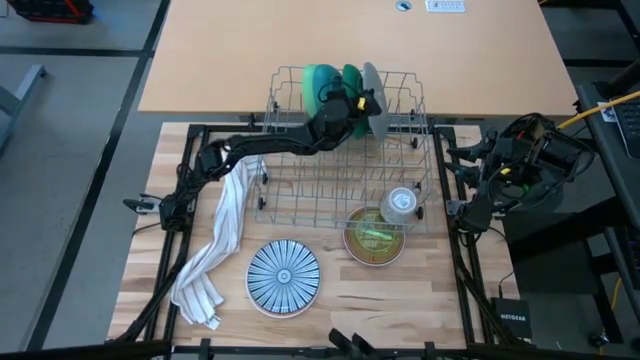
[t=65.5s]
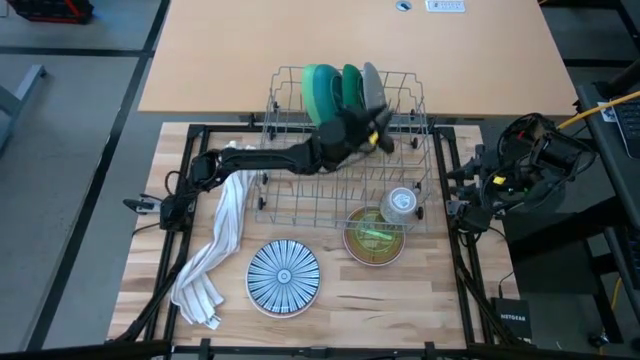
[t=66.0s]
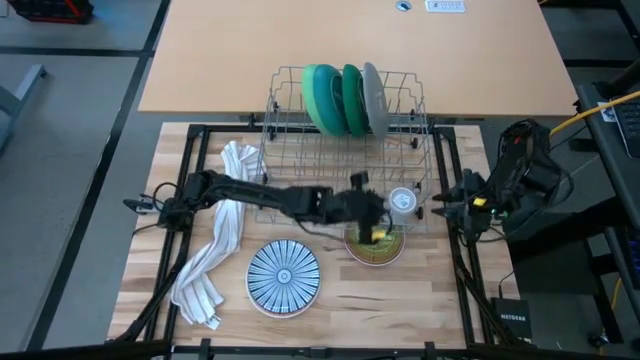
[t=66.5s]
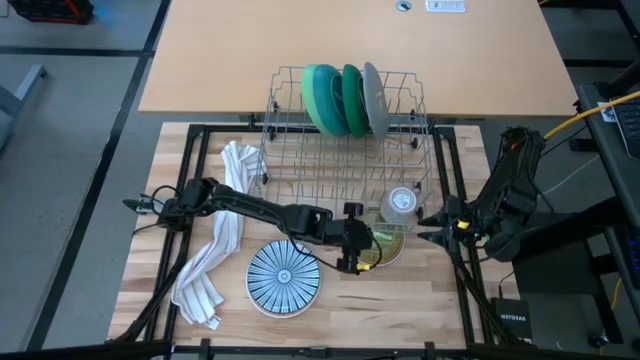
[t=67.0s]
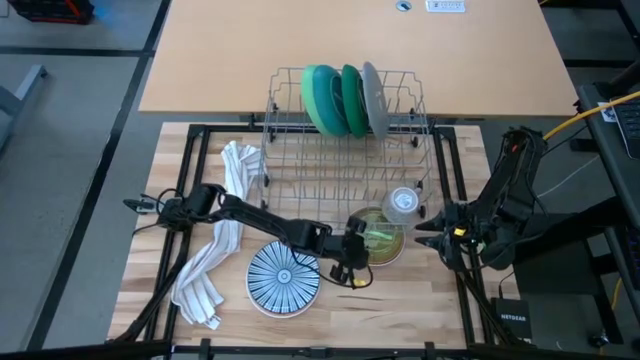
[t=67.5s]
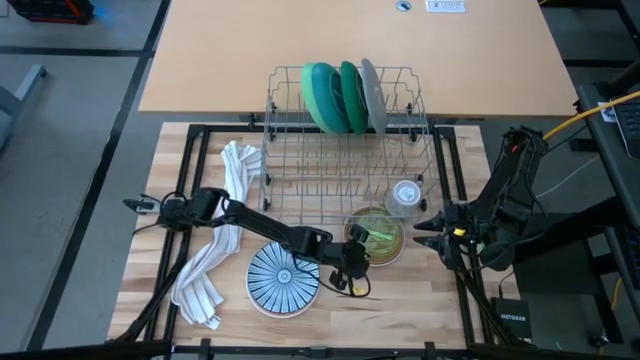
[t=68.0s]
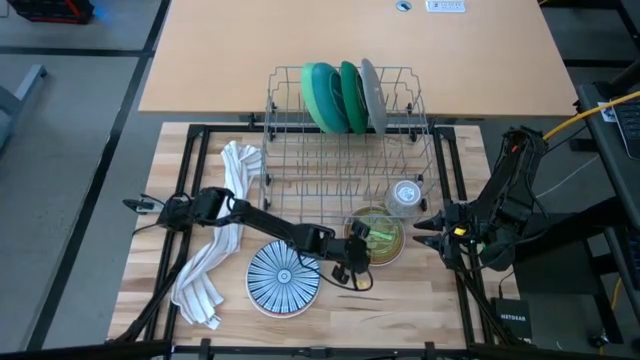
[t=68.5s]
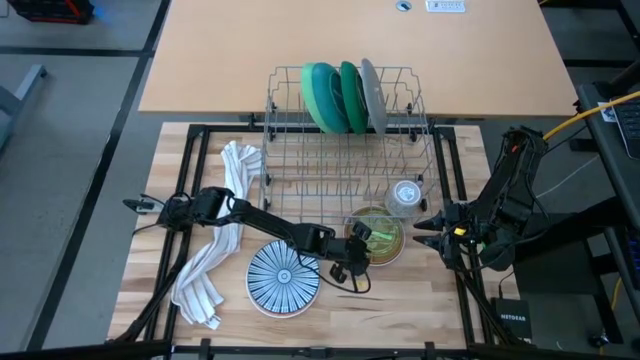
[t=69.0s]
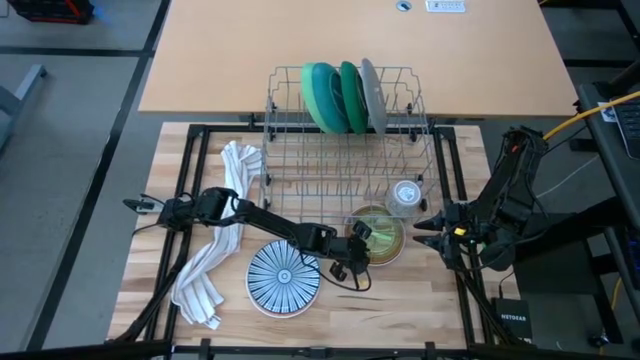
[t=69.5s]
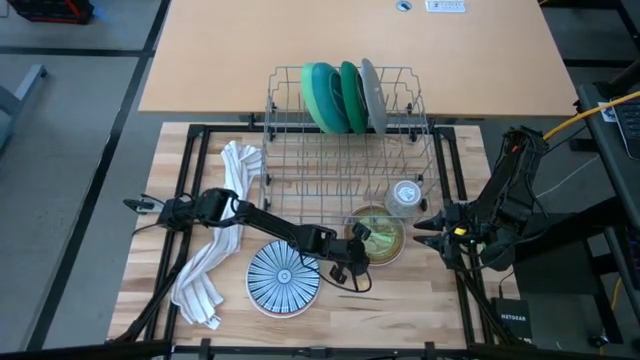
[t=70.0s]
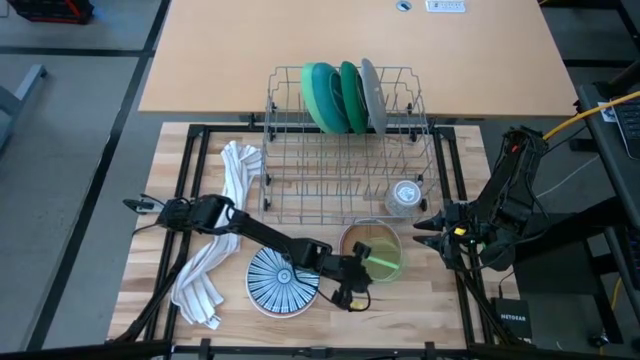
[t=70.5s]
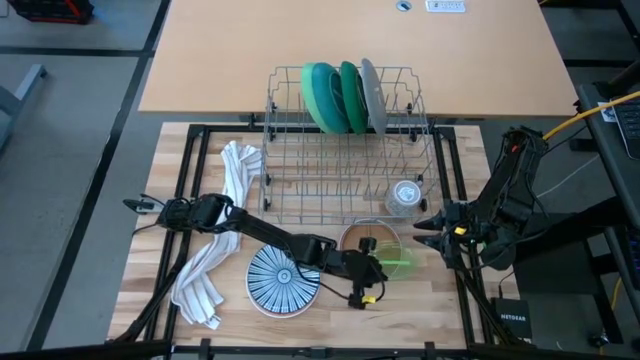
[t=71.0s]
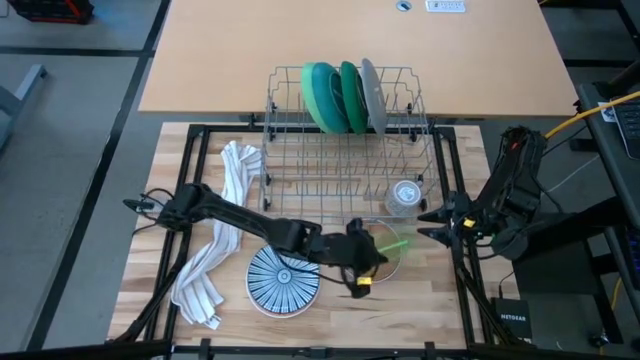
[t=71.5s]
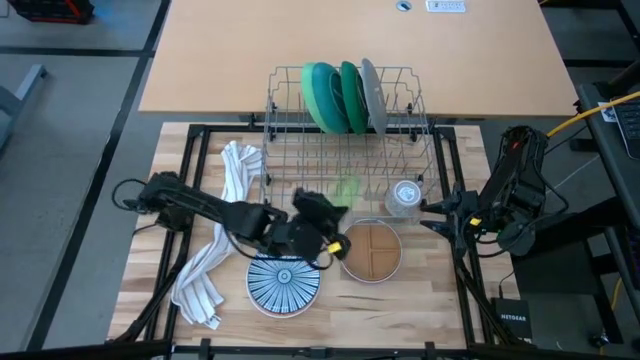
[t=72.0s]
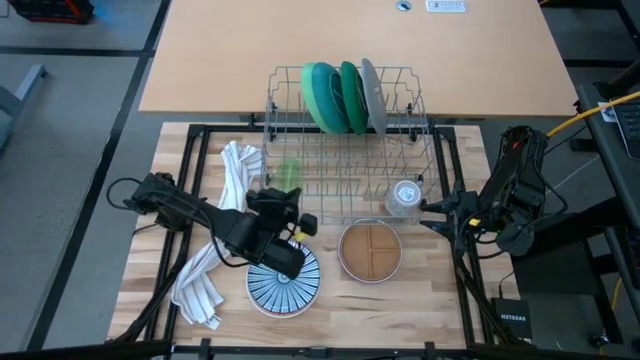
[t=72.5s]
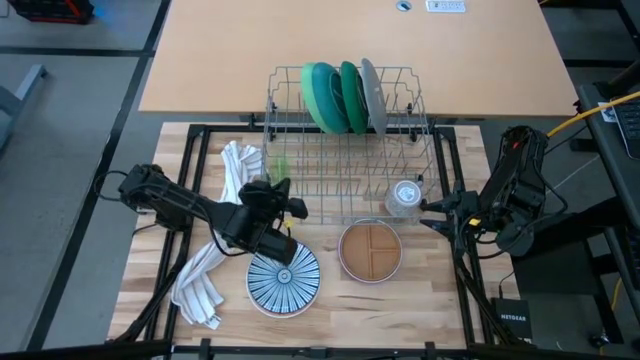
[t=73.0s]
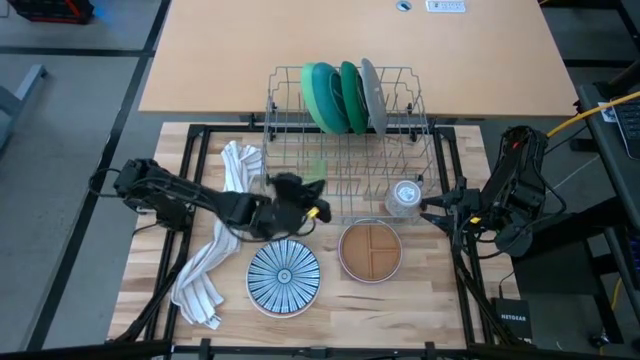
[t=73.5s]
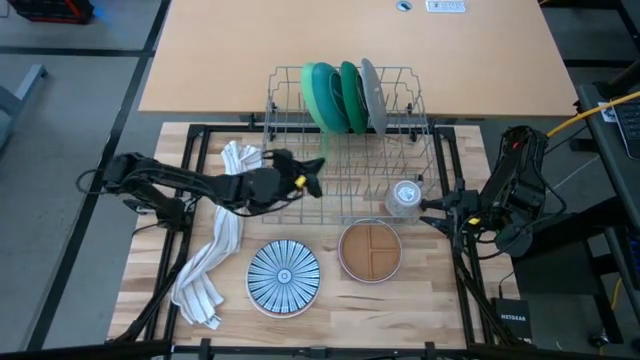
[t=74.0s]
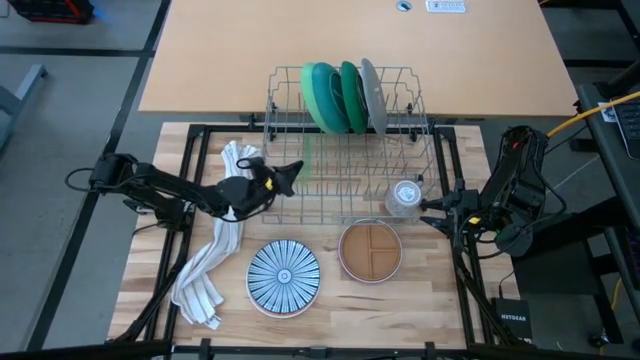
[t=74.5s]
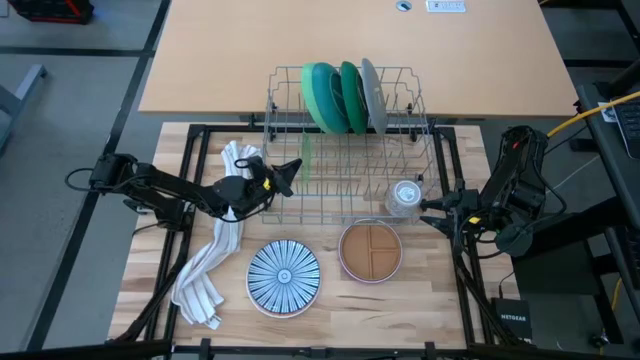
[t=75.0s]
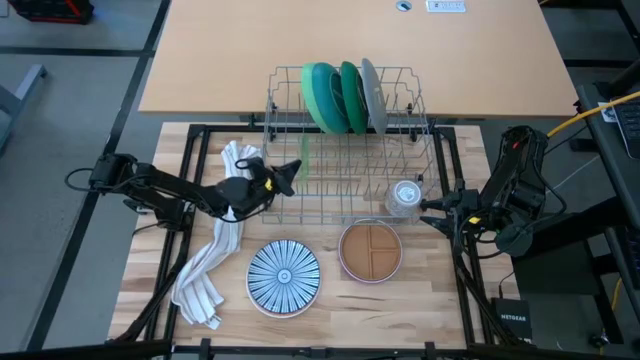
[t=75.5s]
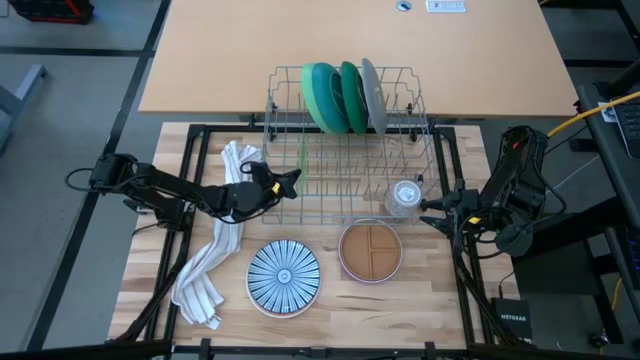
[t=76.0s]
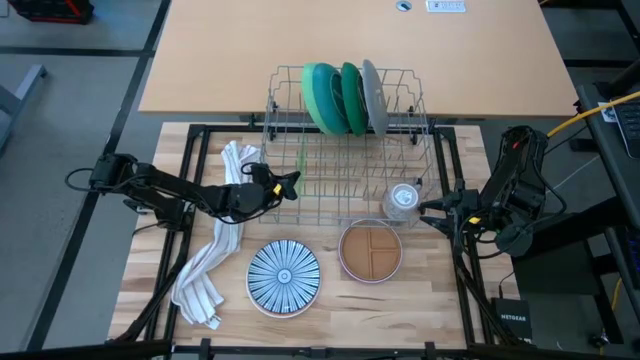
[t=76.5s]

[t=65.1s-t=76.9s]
Task: Sort dishes
Put the green plate into the dish rack

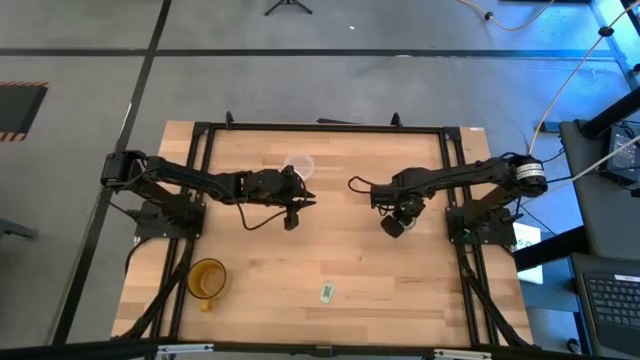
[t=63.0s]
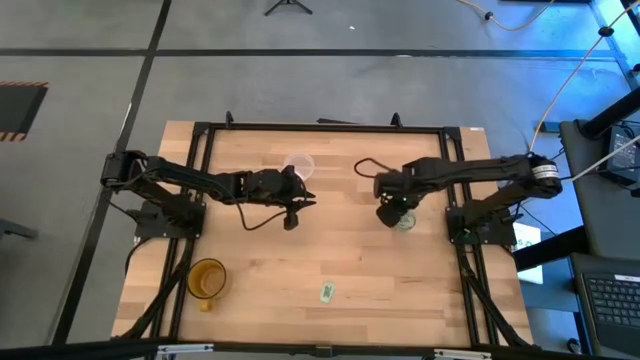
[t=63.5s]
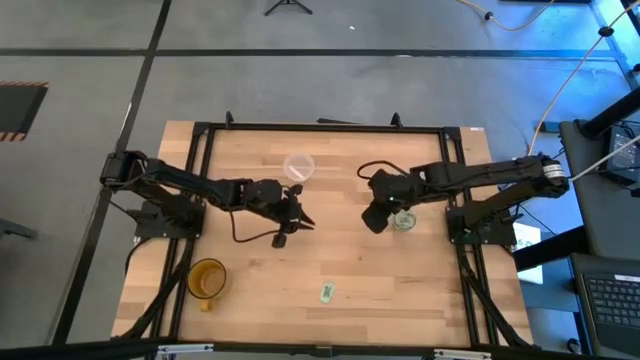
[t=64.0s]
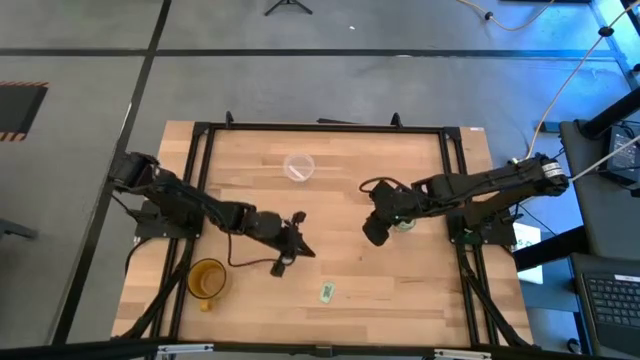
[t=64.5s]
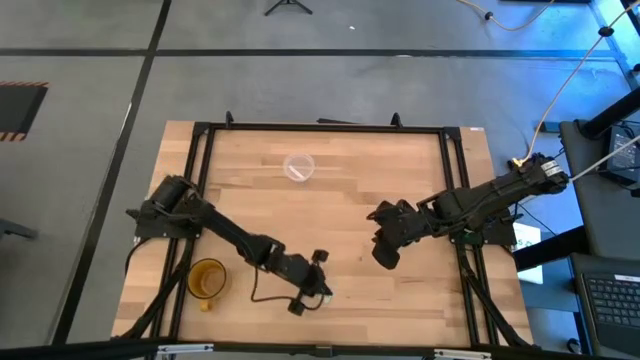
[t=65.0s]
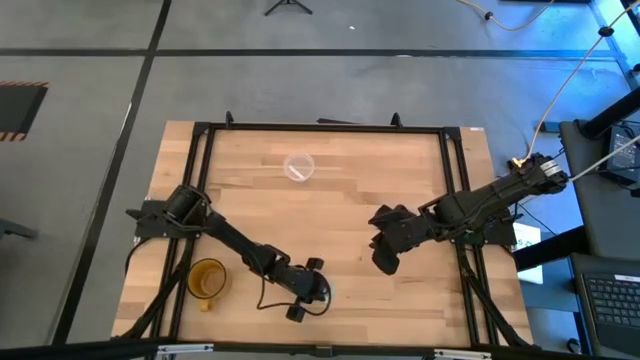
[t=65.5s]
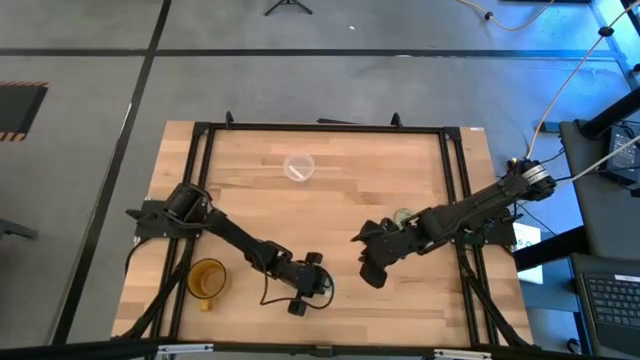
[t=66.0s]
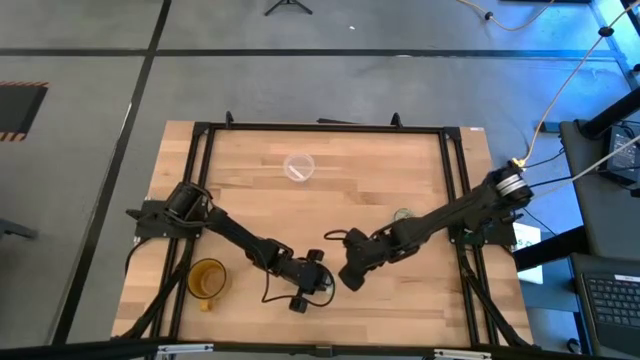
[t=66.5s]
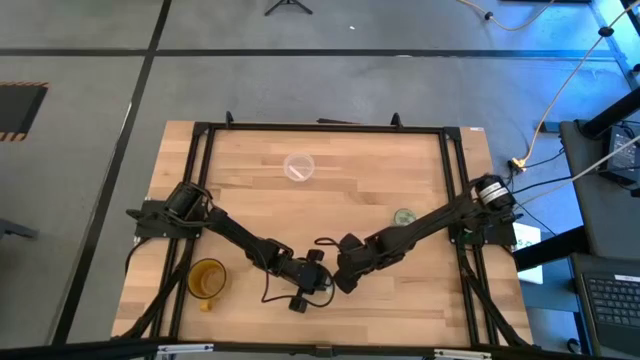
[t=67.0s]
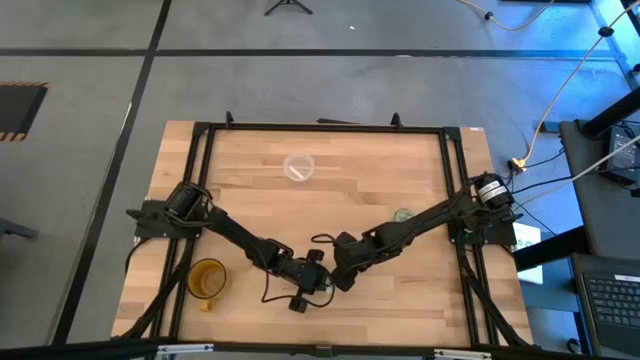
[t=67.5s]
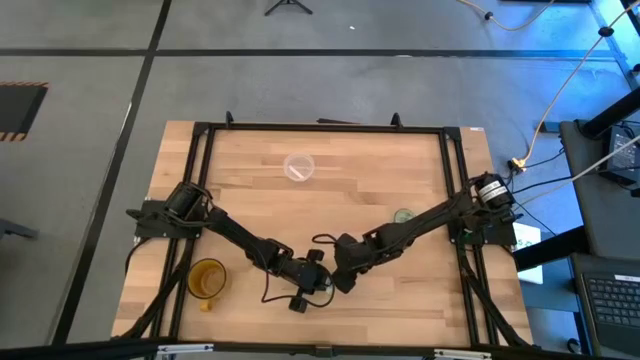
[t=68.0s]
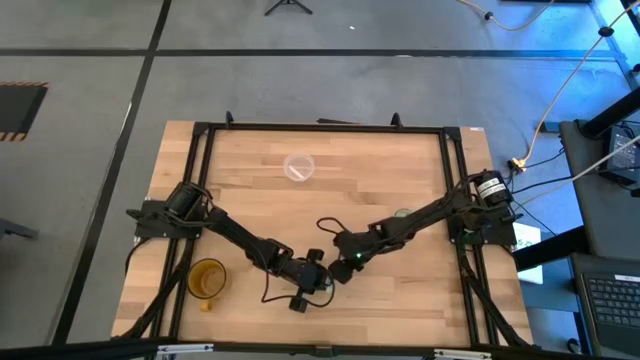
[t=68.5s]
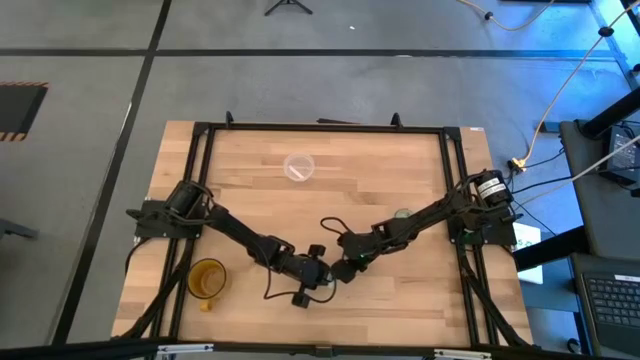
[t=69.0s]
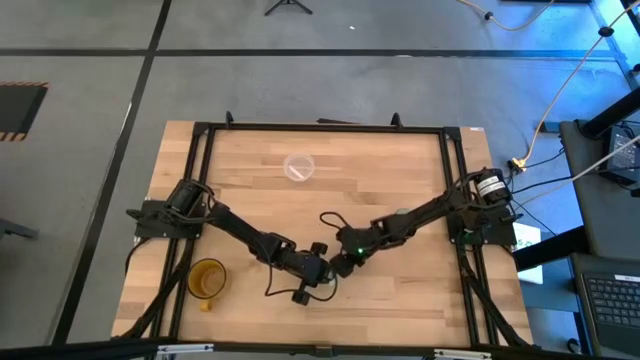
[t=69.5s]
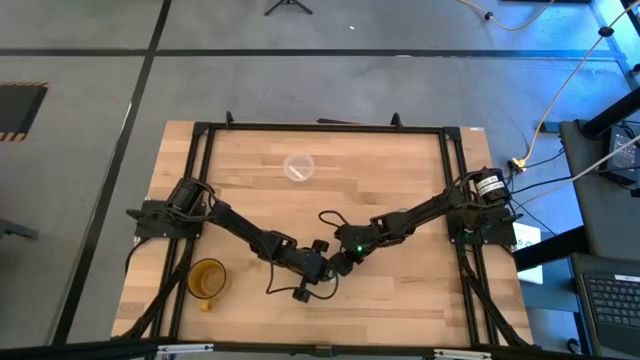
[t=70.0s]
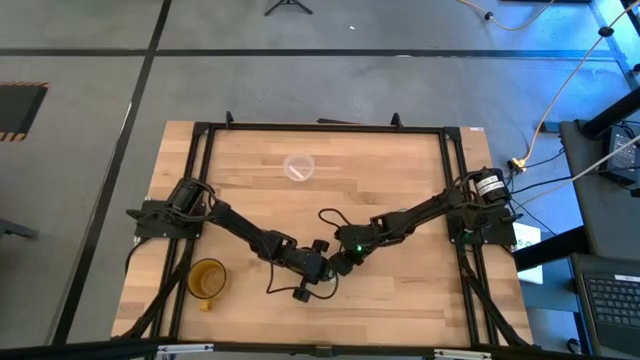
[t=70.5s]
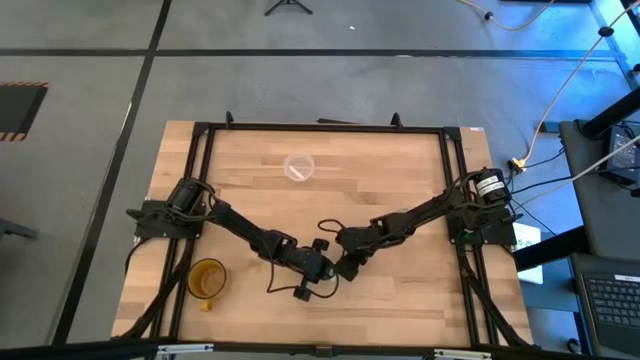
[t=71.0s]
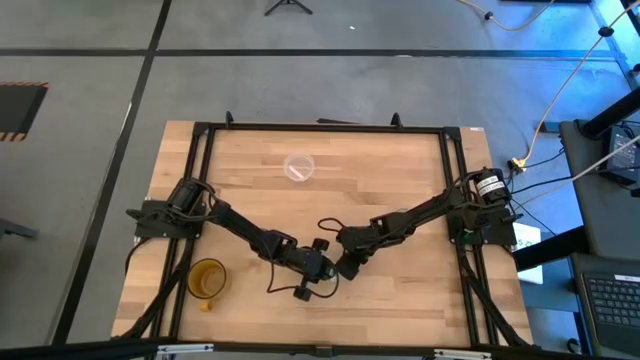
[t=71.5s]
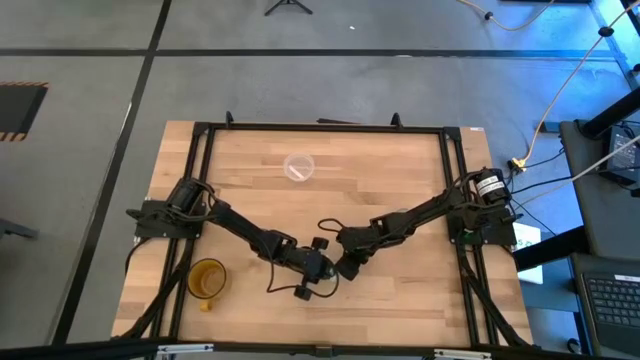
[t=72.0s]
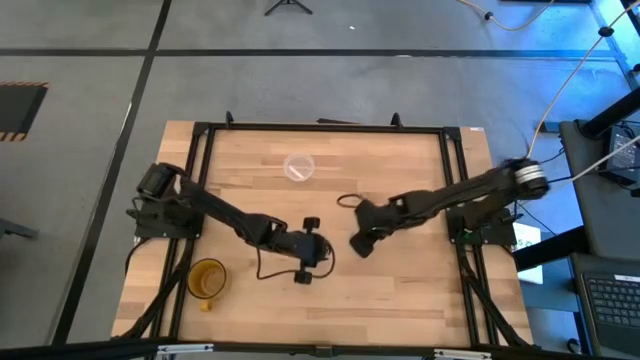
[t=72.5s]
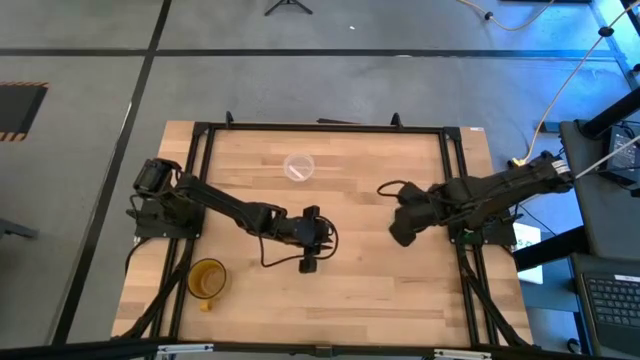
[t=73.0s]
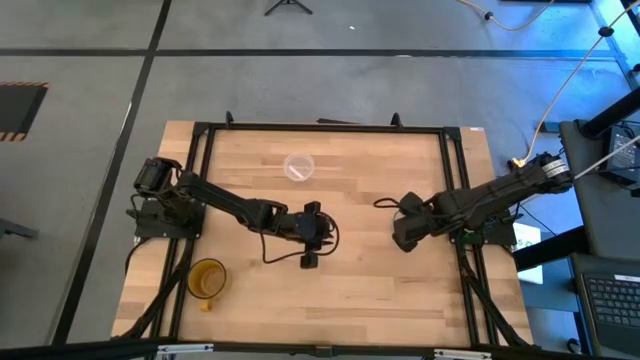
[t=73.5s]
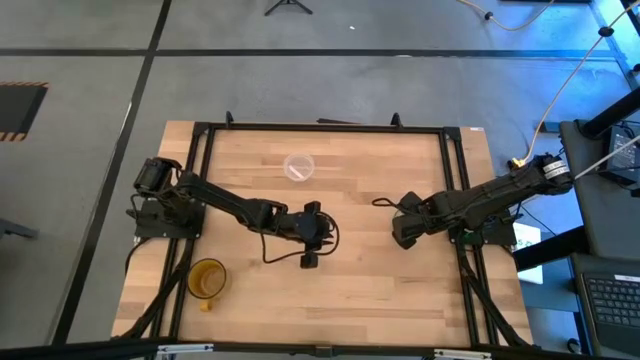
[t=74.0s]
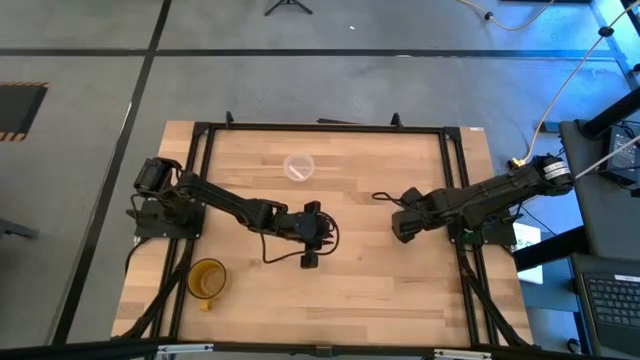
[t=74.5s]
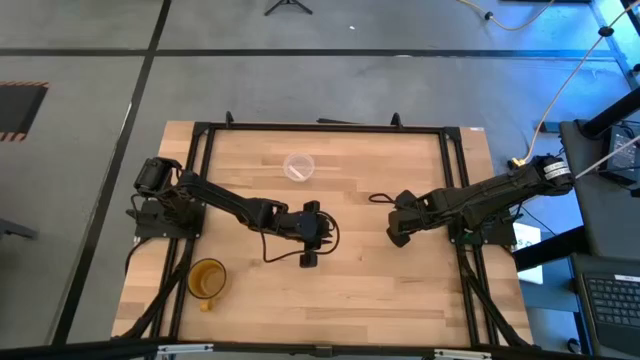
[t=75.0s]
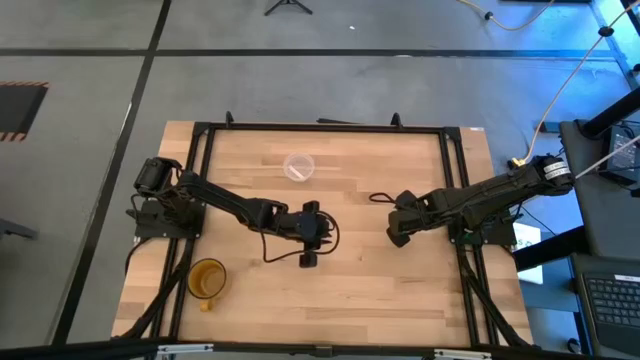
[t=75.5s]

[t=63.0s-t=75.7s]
Task: Pick and place Stevia / Truvia into bins
Put the stevia packet into the transparent container
